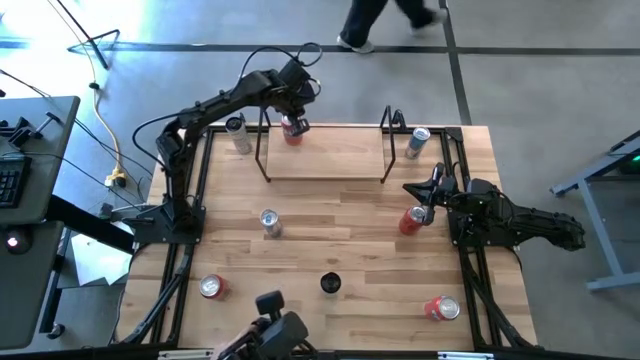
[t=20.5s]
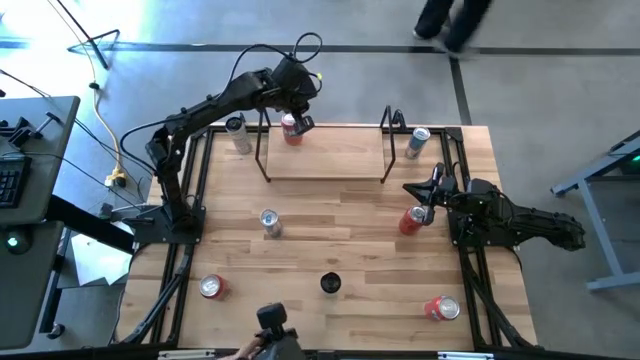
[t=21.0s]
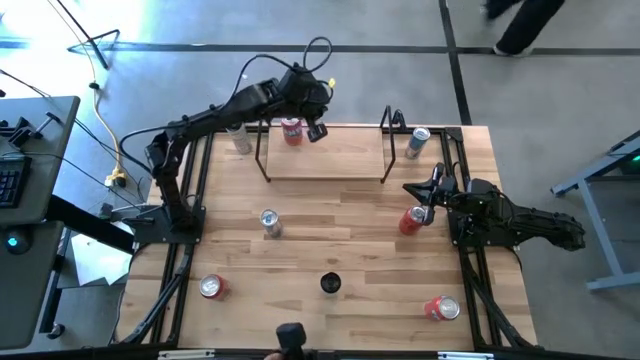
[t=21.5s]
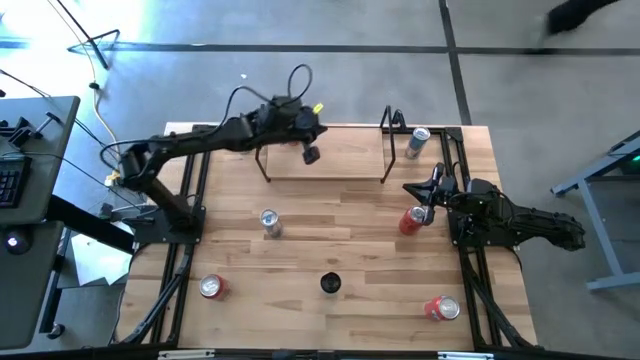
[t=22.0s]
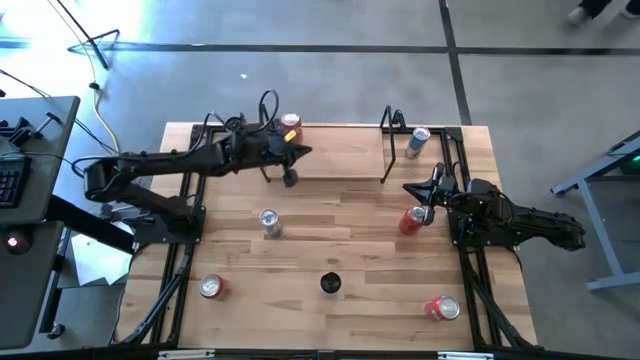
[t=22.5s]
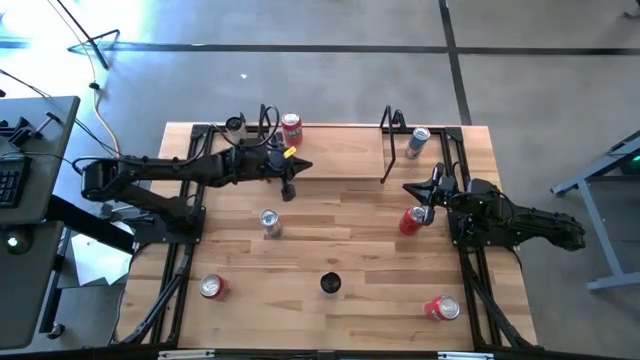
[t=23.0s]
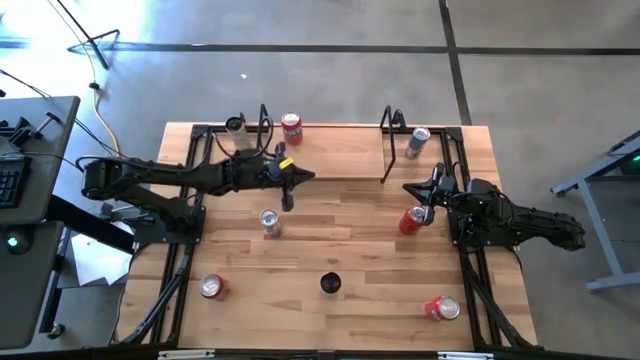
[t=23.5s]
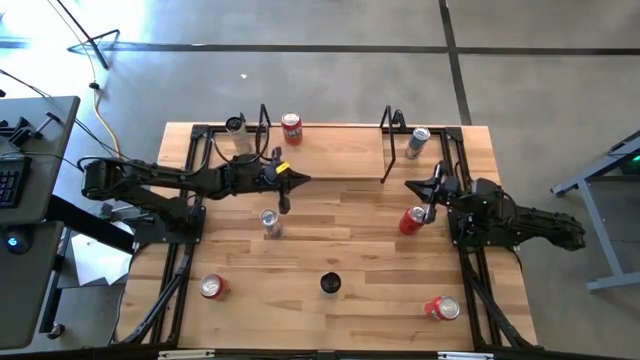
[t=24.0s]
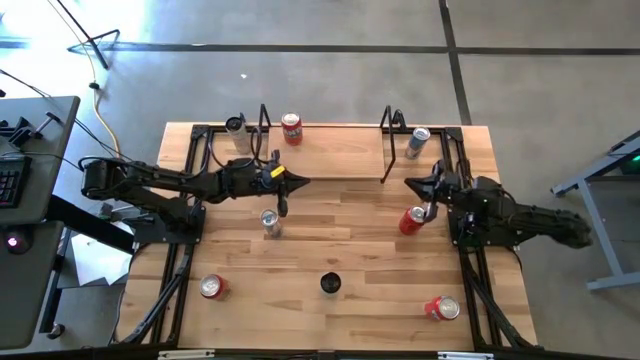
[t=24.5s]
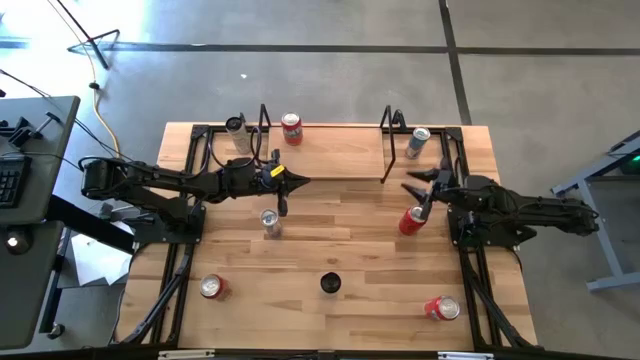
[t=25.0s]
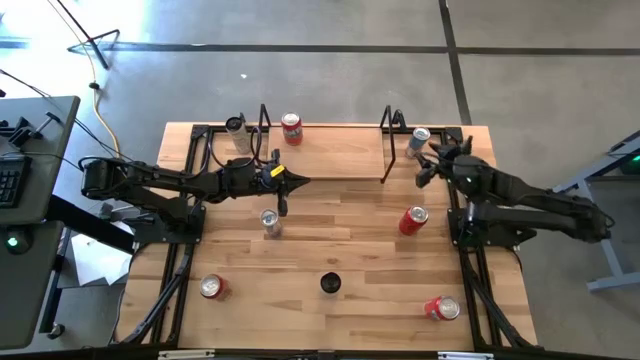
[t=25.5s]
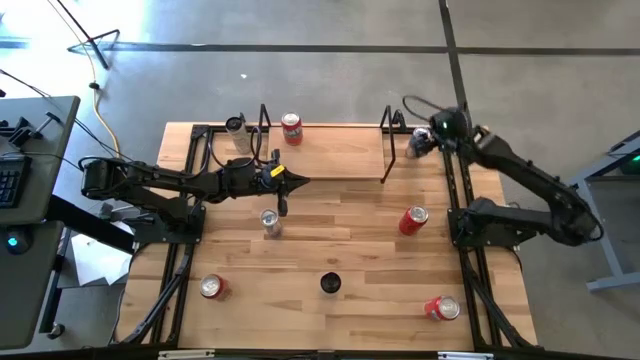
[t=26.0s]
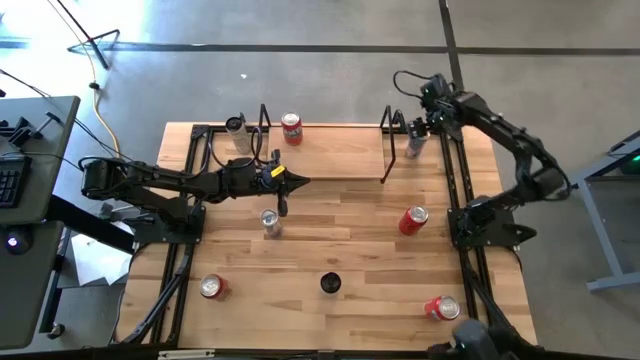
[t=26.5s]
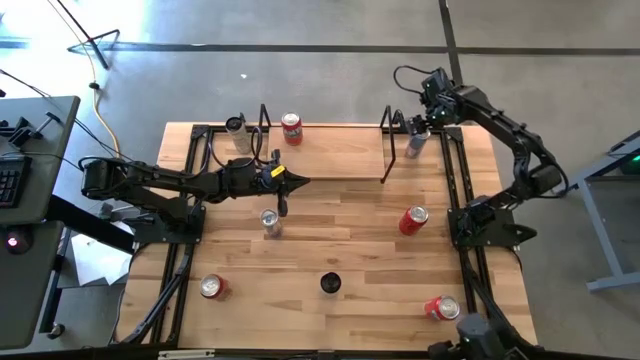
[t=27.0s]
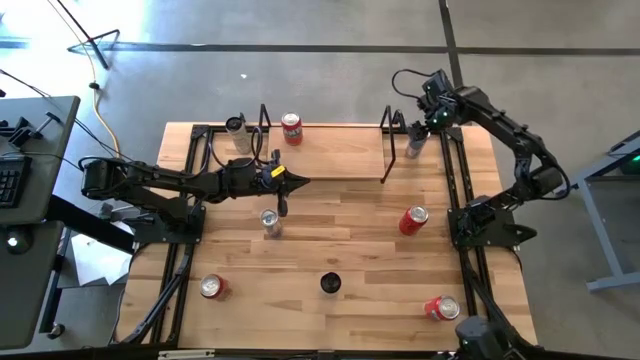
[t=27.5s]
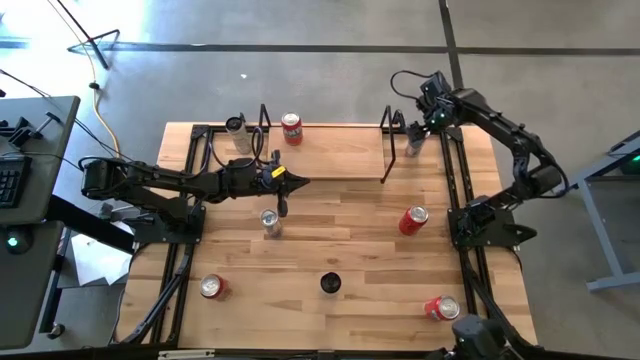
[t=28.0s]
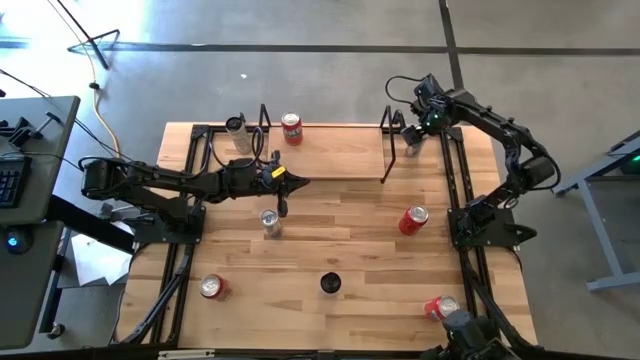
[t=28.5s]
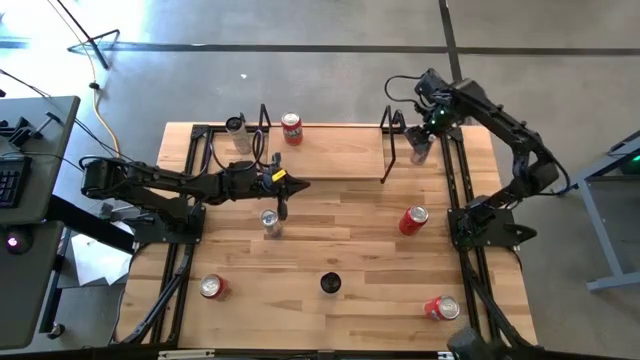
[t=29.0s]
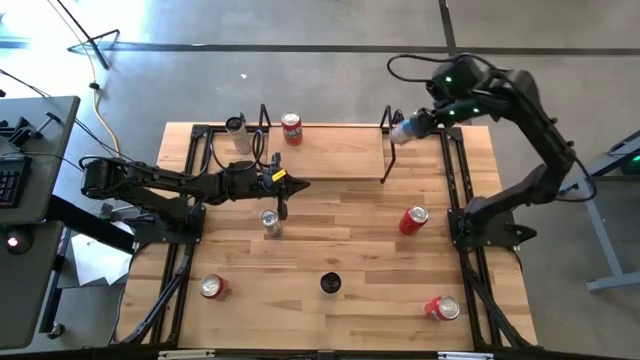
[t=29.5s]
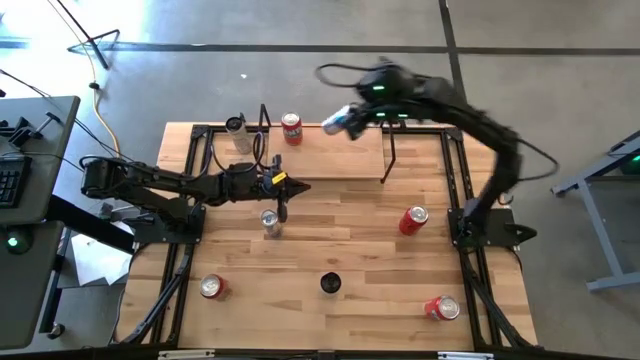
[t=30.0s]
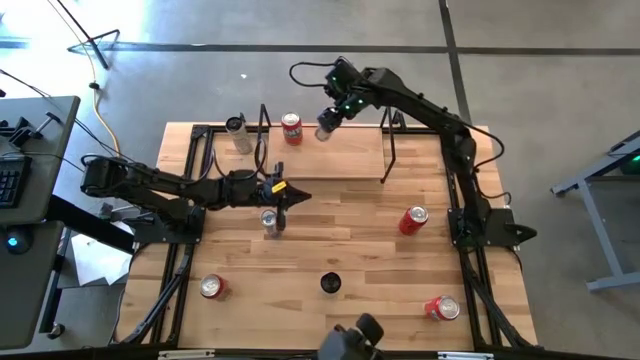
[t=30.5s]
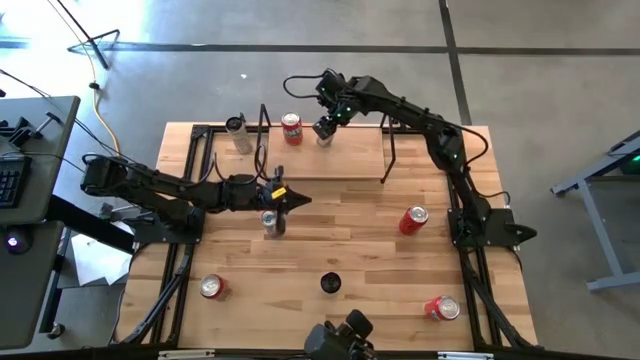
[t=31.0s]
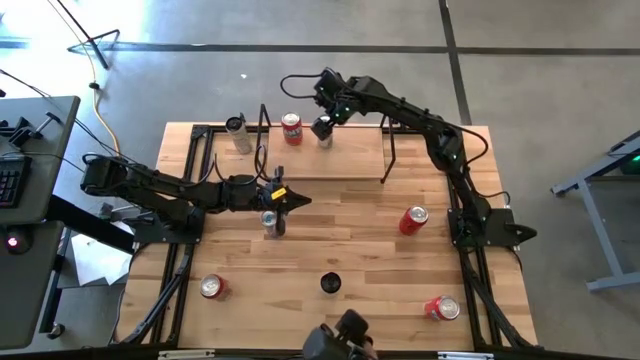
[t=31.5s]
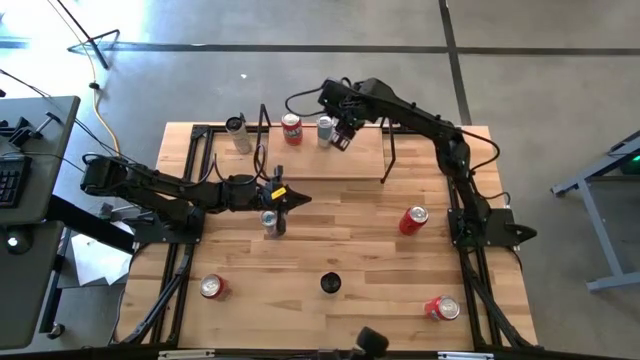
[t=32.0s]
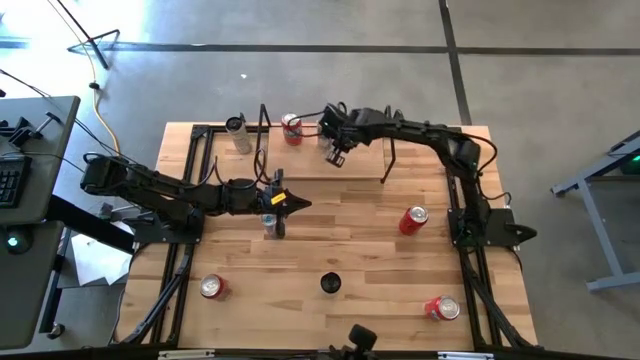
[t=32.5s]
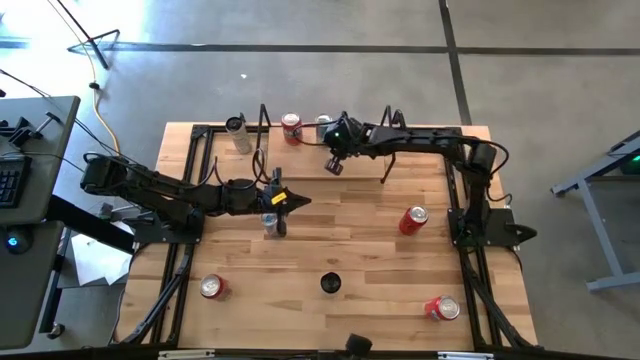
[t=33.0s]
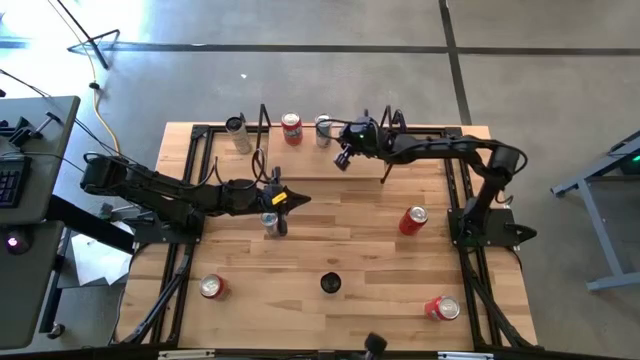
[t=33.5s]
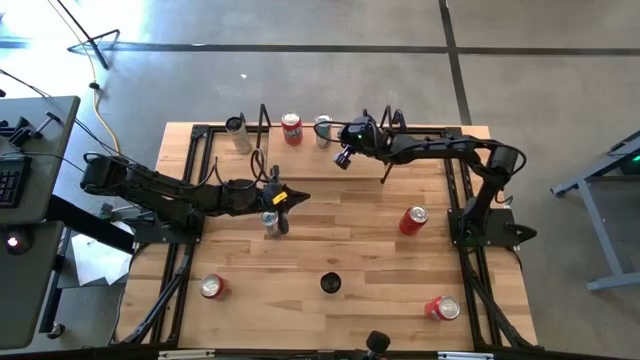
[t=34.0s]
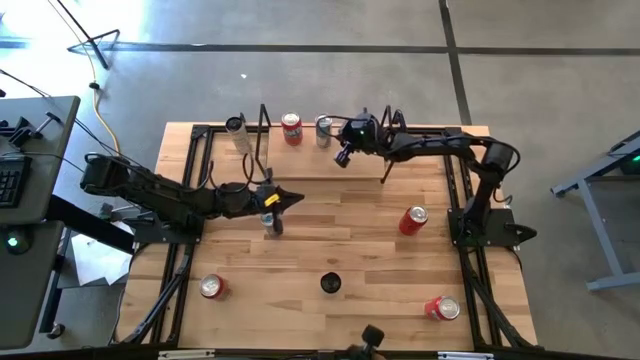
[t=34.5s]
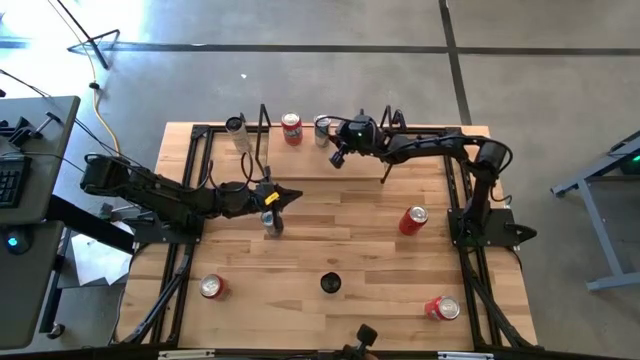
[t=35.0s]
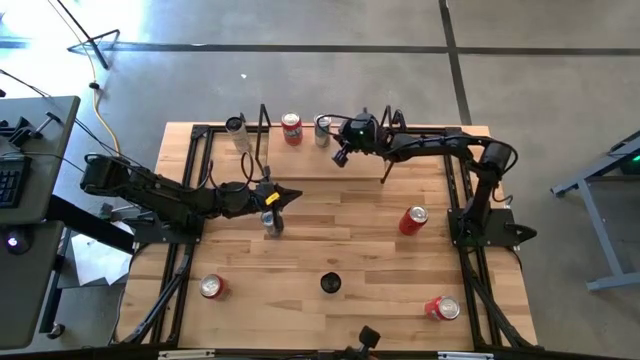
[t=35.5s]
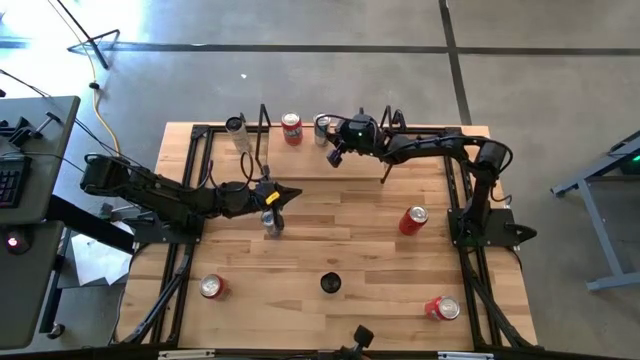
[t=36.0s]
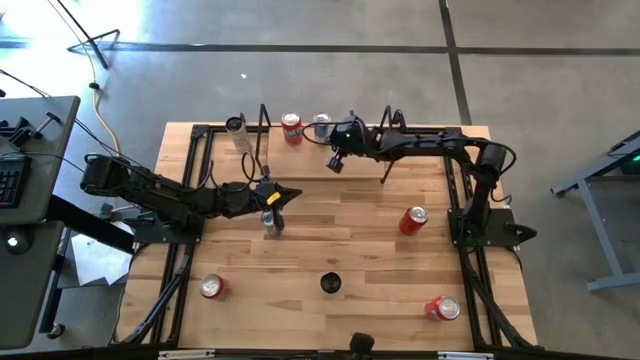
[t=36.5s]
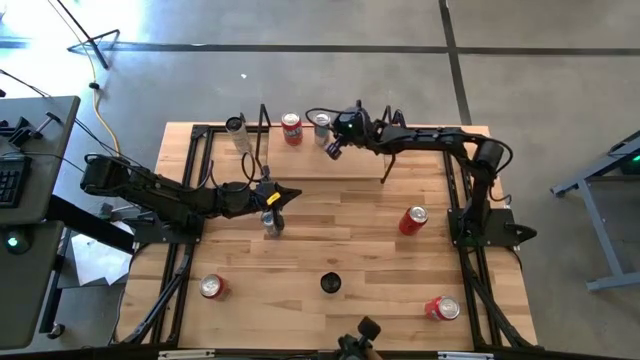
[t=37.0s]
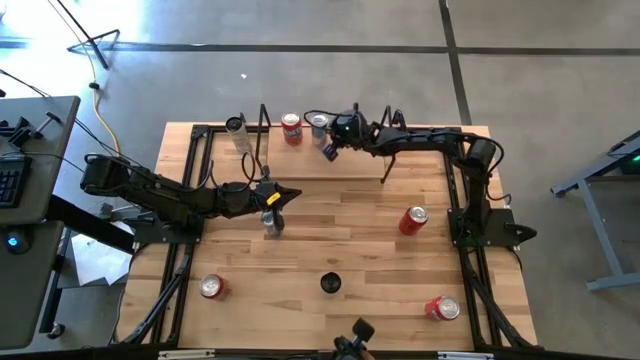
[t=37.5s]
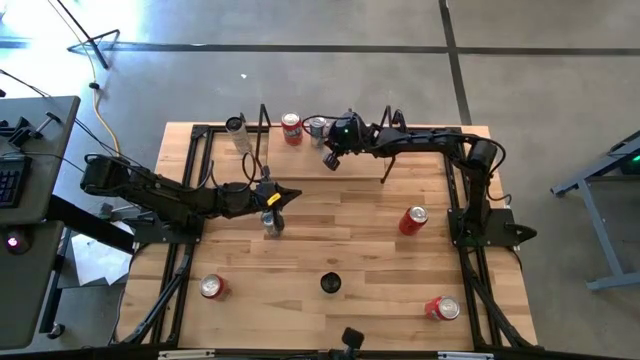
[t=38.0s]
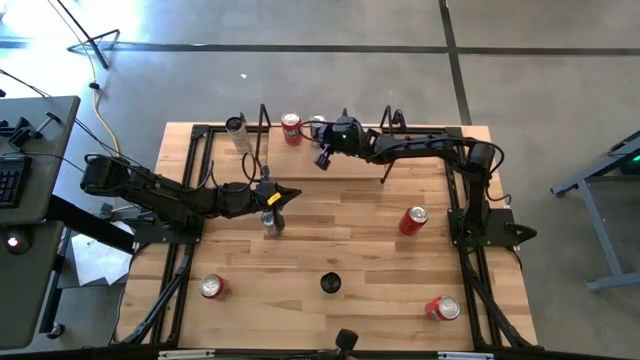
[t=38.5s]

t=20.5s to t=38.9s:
Task: Place canned beverage on shelf
Put the top blue soda can on the shelf
